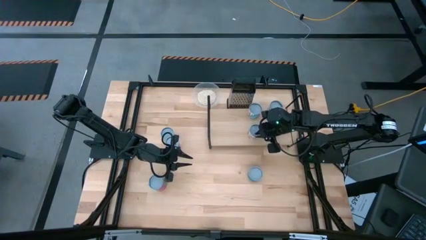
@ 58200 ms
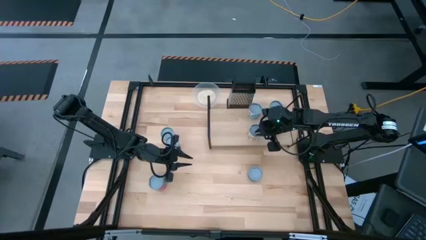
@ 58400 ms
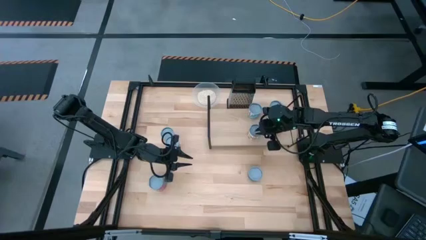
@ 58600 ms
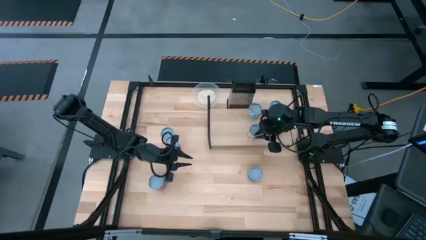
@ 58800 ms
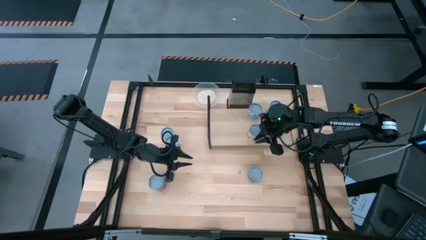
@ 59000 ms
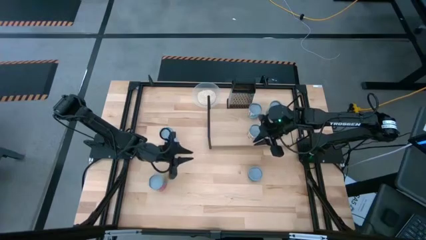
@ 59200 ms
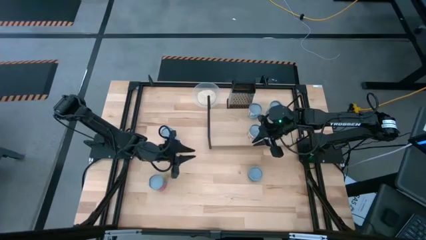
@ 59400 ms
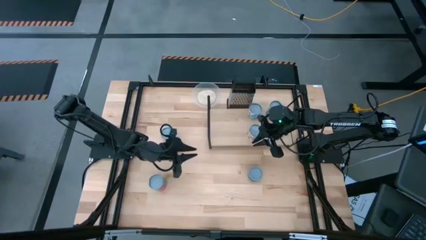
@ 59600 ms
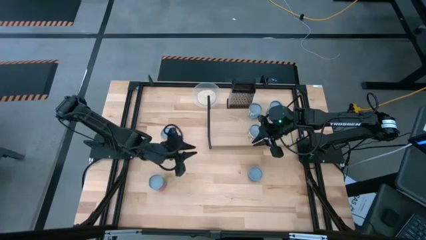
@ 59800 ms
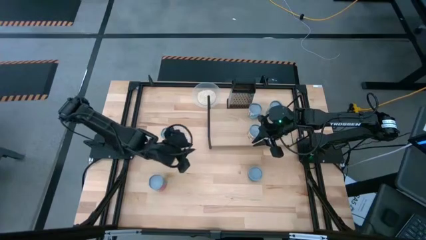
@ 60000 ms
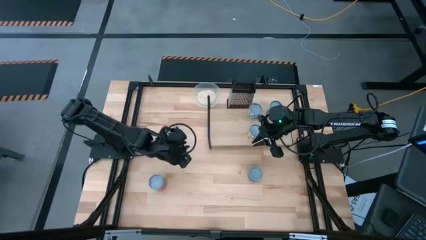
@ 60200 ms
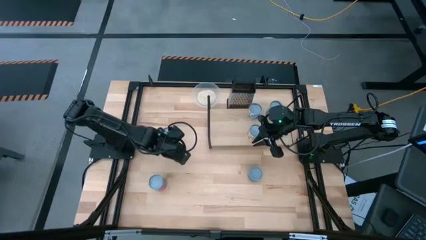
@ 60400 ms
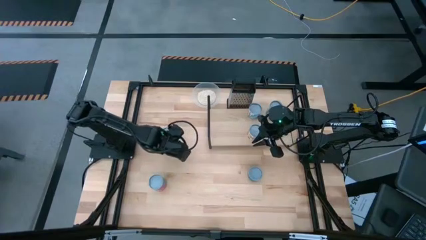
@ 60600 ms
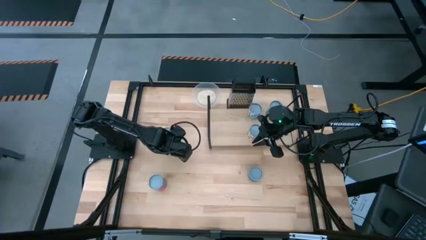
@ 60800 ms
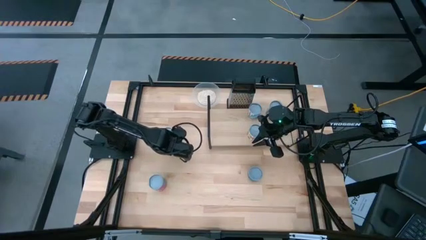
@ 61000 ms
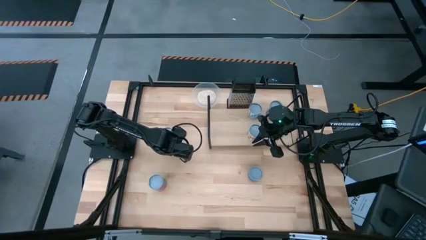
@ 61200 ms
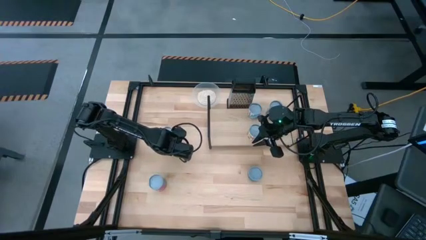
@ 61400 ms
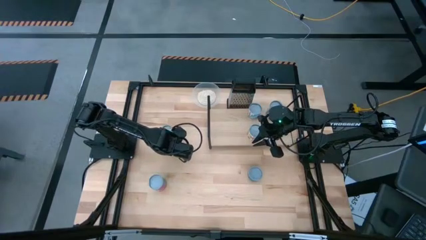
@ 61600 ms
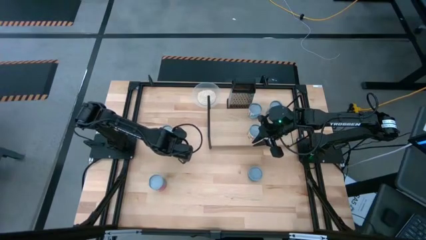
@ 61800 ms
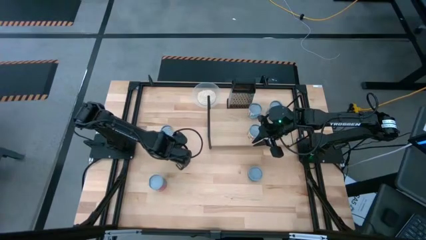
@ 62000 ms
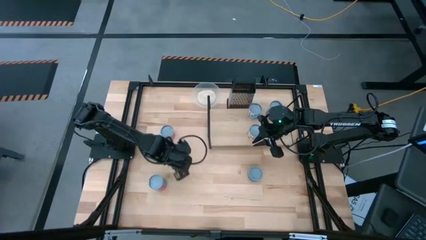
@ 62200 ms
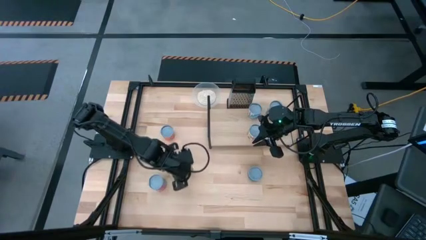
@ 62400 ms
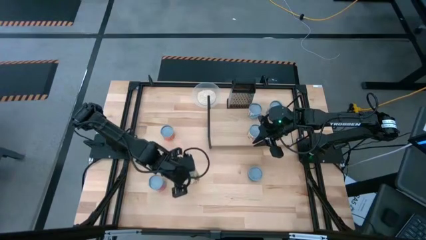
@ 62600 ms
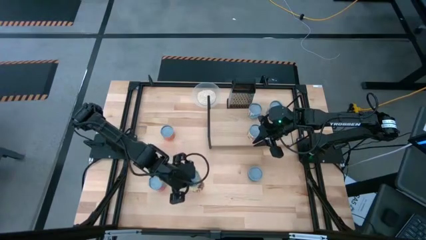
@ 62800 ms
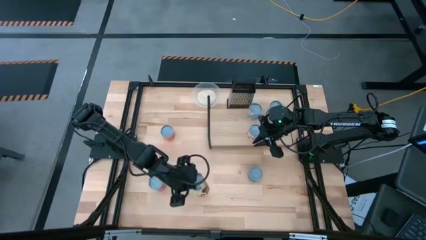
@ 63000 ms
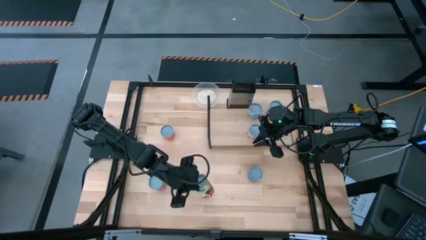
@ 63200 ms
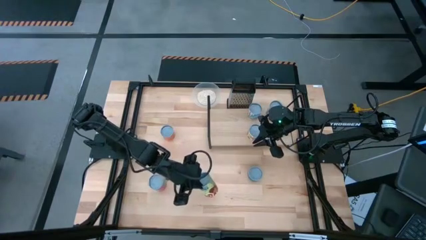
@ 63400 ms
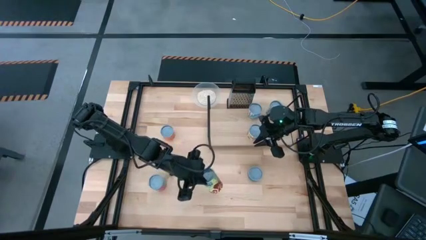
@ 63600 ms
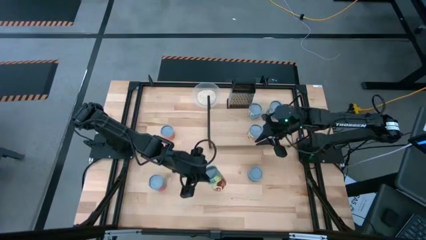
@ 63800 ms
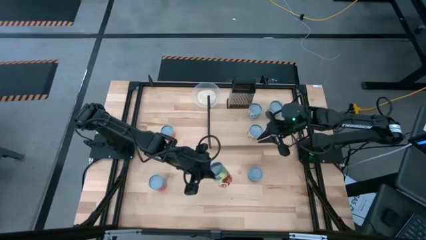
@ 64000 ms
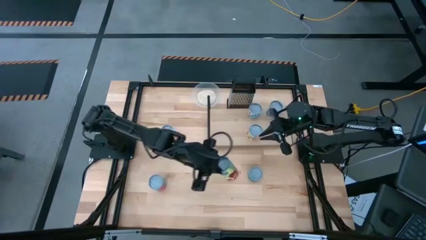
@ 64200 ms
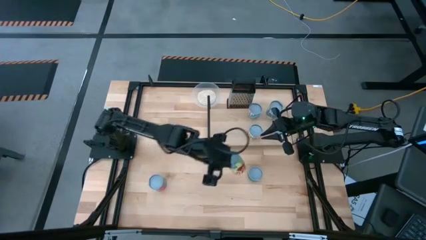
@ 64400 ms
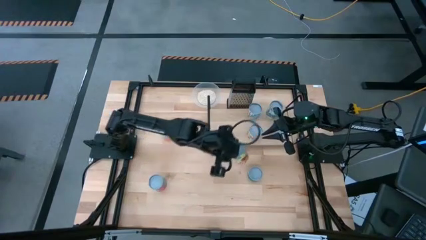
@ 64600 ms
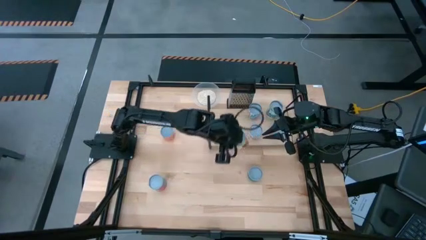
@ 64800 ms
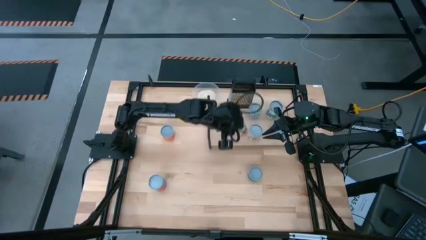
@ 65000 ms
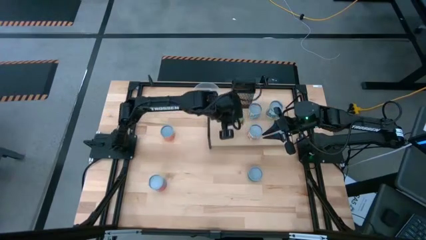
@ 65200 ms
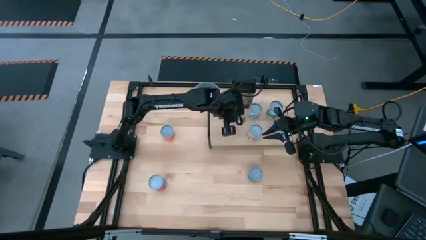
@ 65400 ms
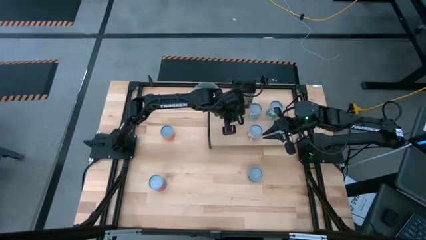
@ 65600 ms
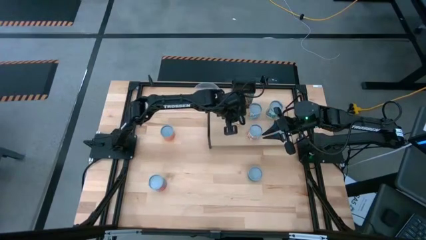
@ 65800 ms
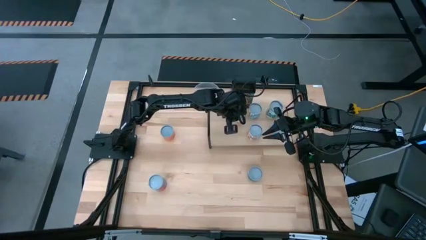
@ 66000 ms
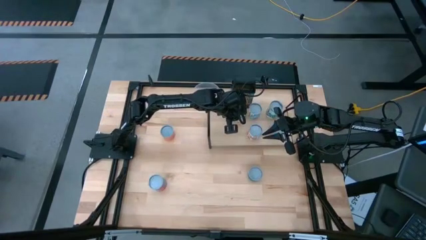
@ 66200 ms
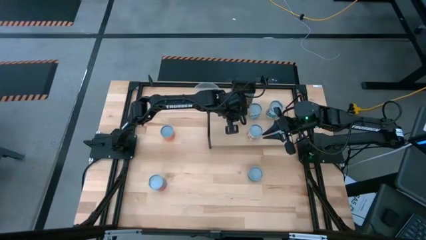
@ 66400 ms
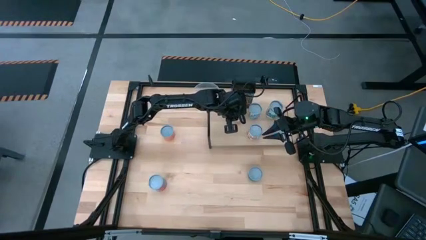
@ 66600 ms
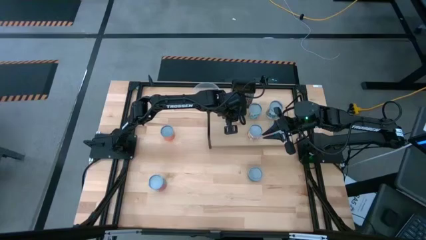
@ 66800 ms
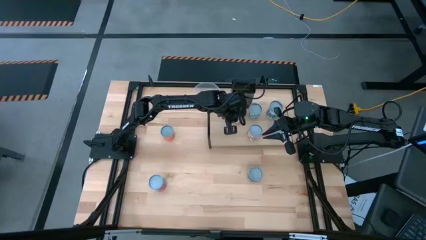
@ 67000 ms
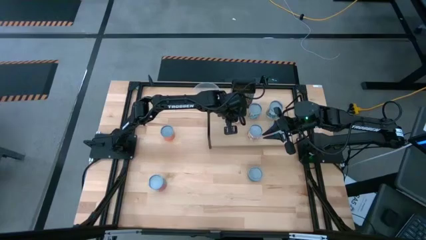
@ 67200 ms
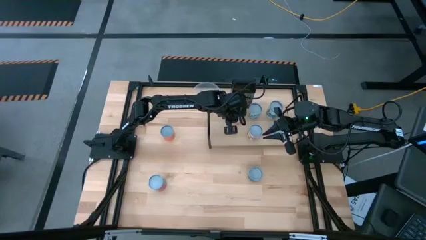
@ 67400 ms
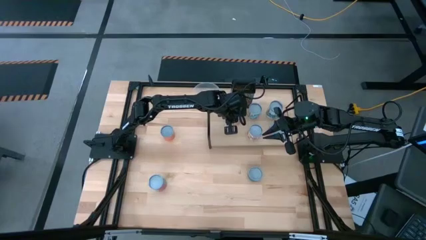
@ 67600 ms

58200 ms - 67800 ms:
Task: Pick and place cans onto a shelf
Put the canned spaghetti sauce on the shelf

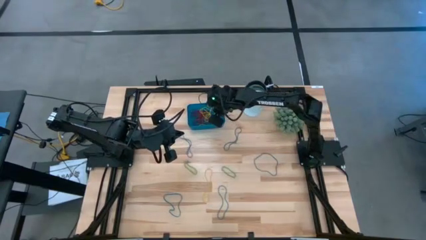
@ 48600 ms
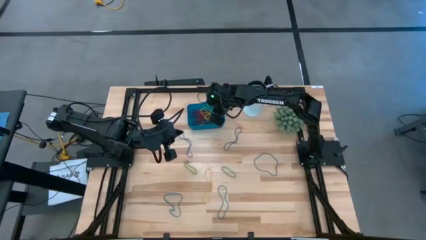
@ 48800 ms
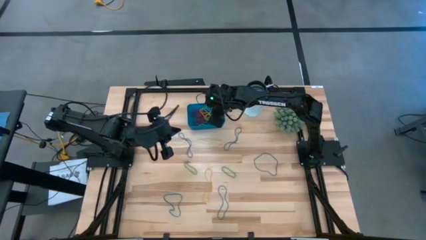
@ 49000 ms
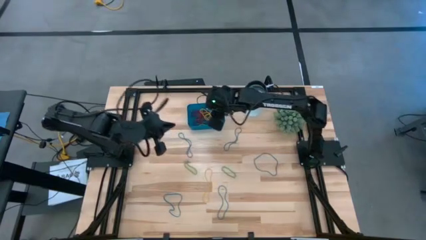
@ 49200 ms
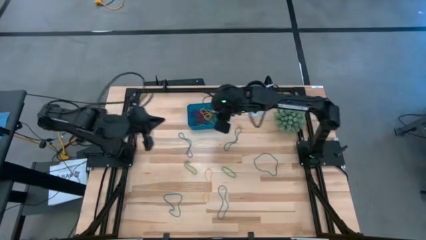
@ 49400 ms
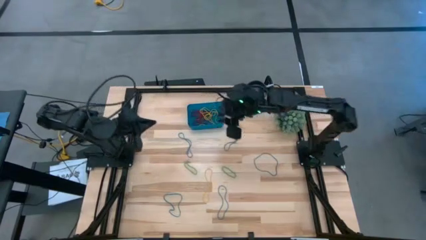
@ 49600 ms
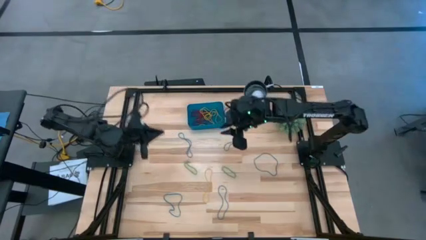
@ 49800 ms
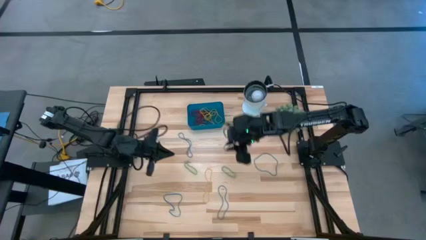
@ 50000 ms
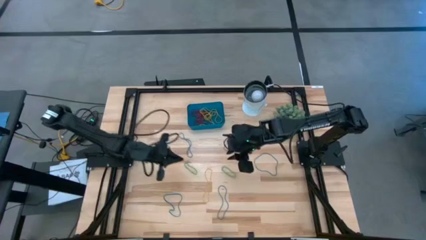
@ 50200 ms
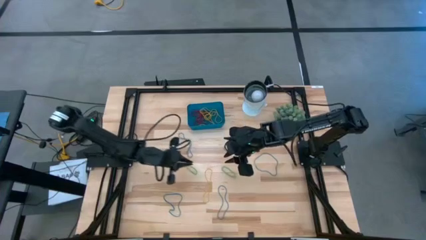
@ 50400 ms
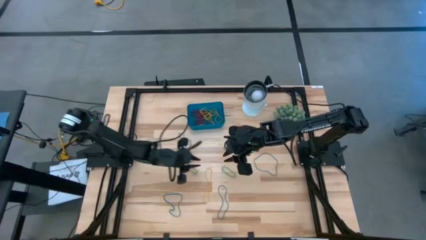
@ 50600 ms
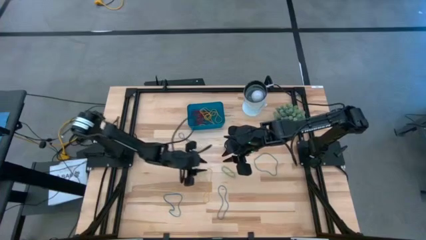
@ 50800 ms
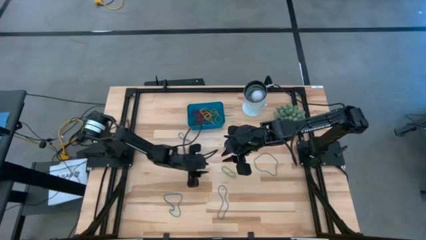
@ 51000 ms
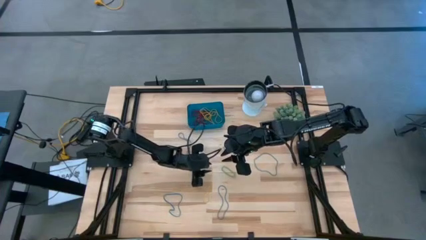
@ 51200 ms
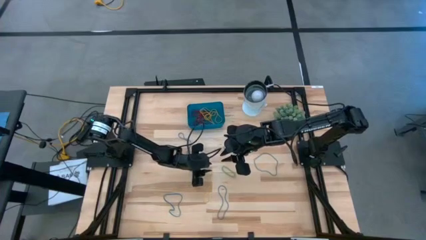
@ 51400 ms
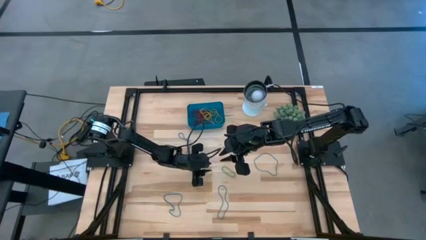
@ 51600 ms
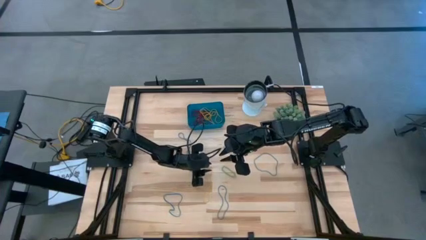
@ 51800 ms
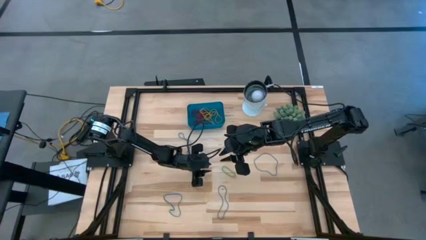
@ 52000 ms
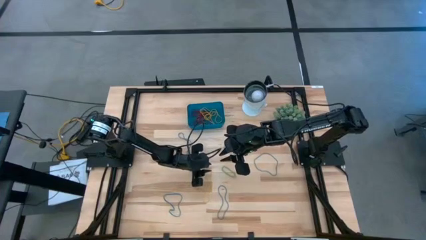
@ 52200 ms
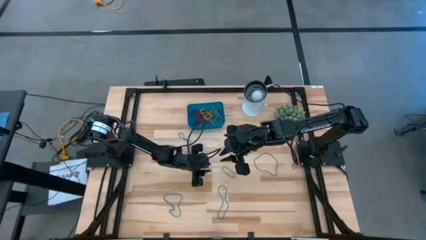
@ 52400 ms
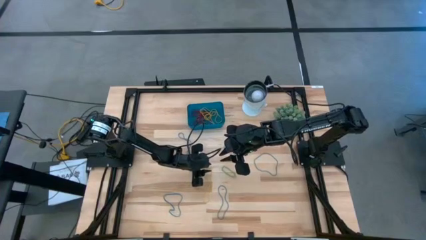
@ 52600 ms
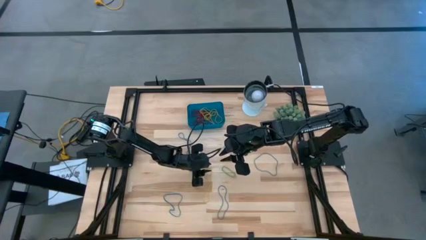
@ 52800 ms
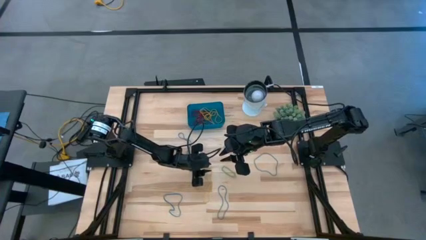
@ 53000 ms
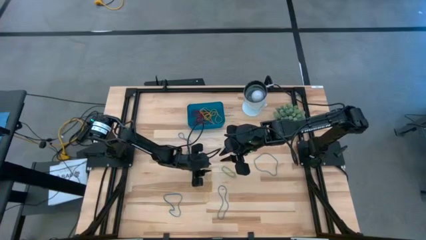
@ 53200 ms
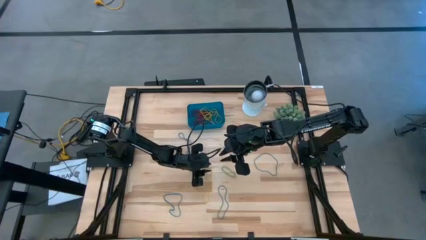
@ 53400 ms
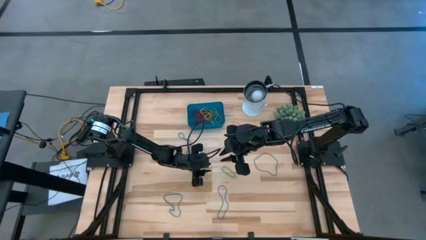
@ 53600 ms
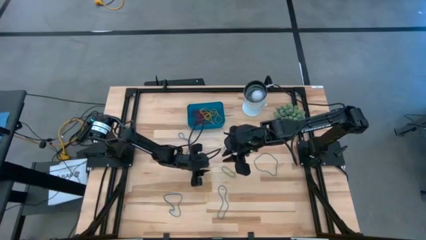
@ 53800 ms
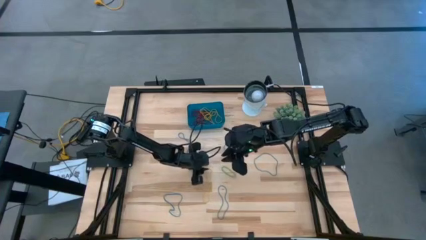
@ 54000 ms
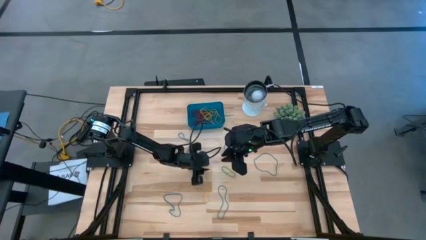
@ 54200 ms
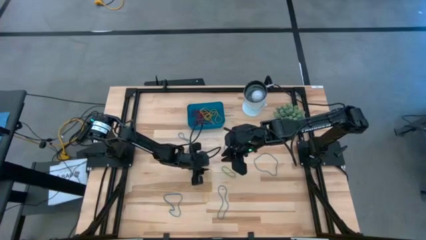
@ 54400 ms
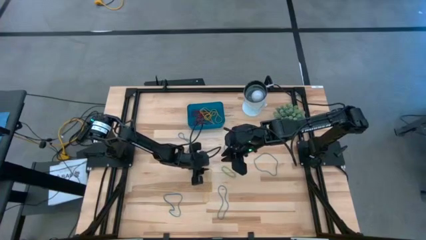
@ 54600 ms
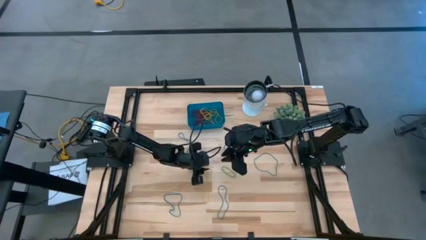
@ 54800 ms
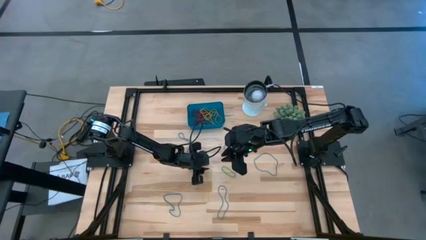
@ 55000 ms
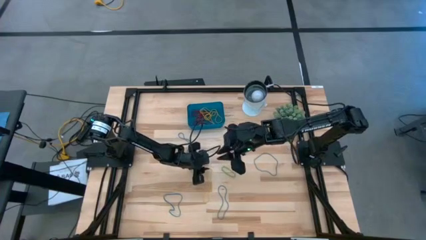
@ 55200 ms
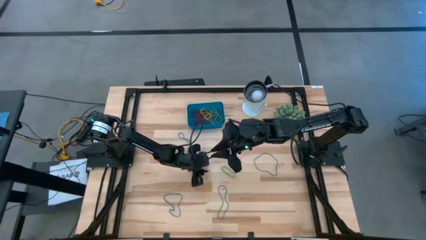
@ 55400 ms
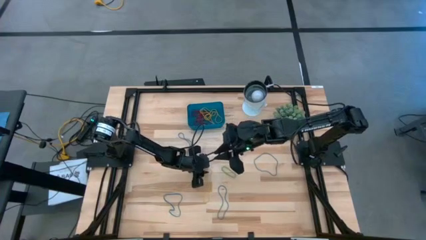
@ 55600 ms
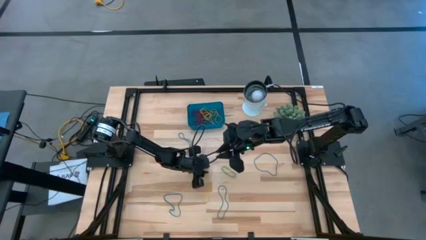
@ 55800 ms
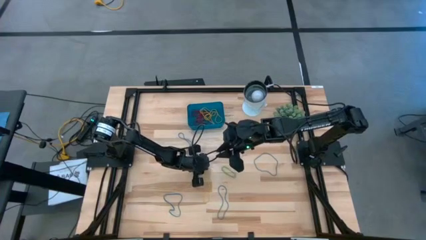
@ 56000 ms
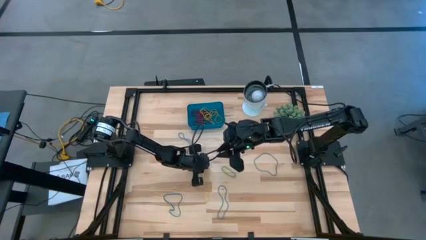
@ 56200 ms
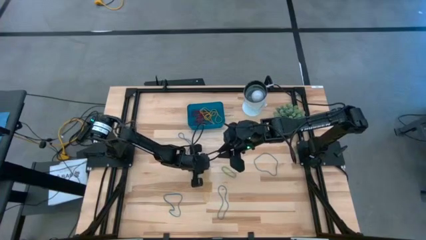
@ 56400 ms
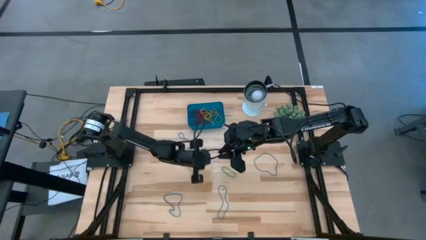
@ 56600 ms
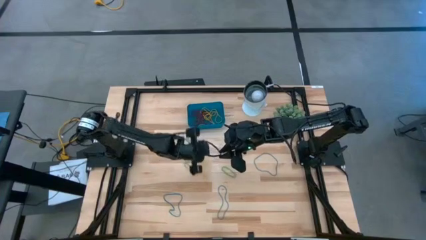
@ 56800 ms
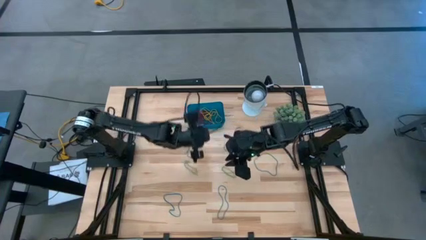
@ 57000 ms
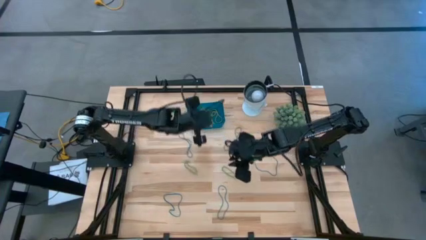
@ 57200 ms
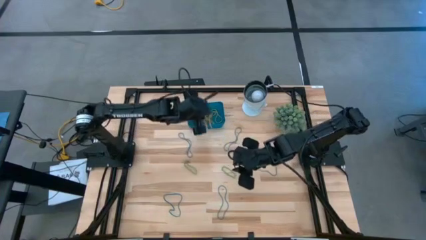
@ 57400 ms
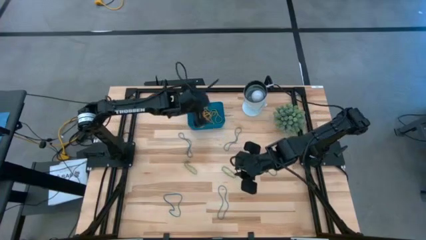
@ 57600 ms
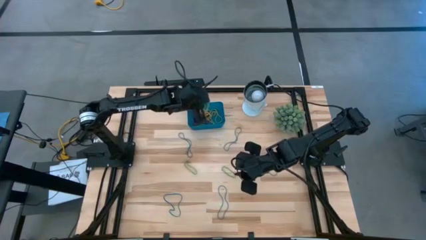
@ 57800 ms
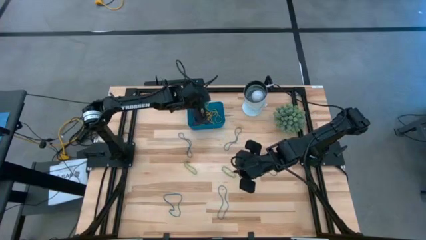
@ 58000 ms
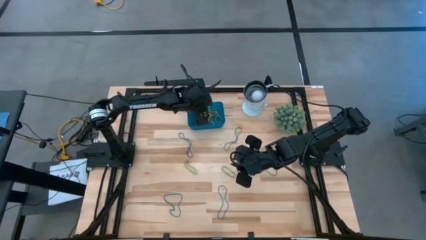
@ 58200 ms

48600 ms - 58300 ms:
Task: Pick and place items into bin
Put the yellow rubber band into the blue bin
